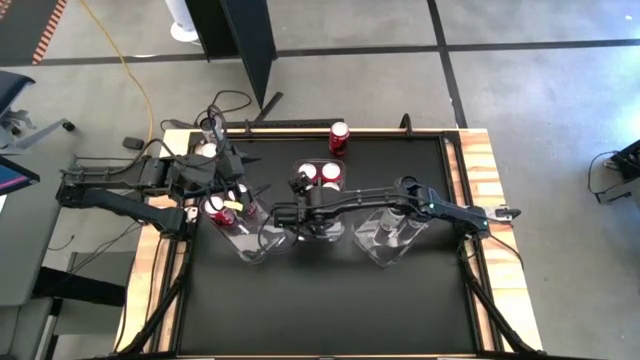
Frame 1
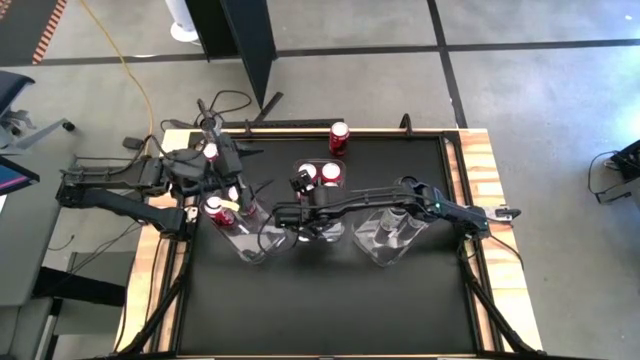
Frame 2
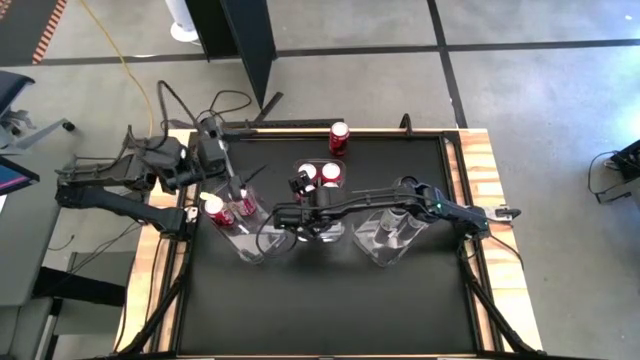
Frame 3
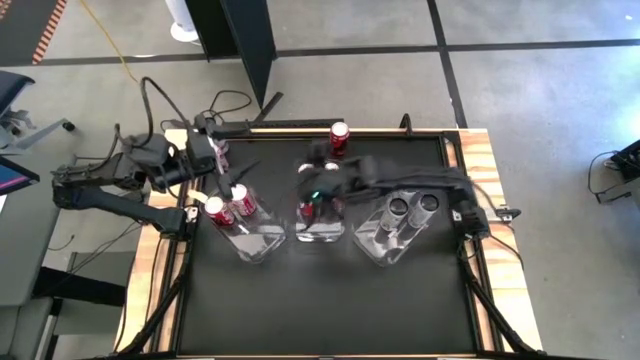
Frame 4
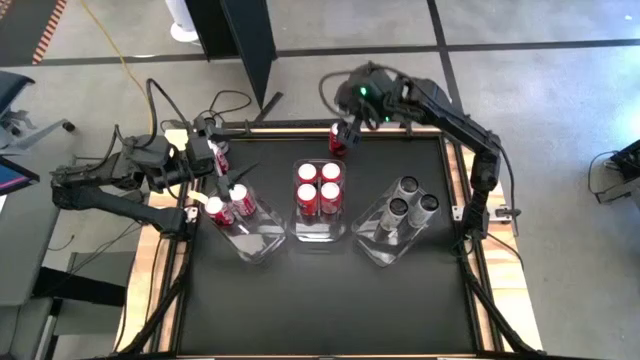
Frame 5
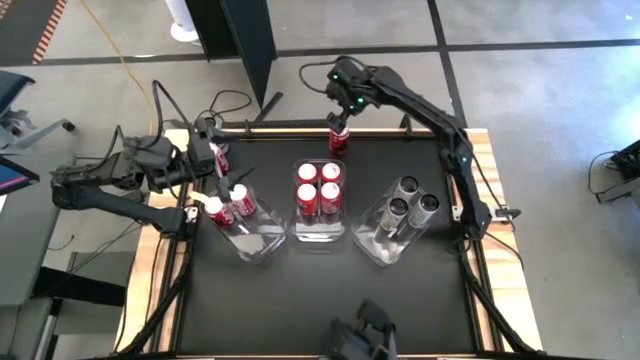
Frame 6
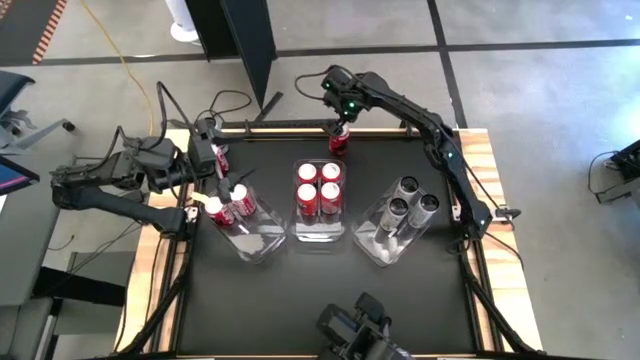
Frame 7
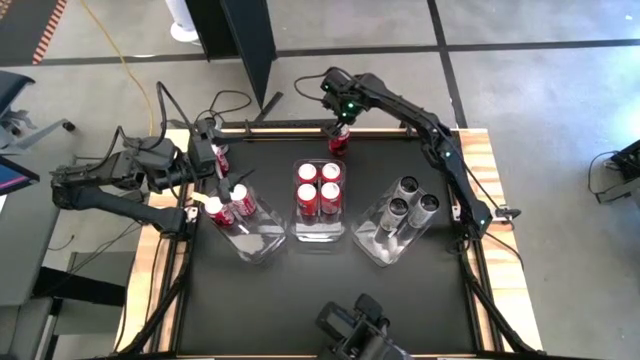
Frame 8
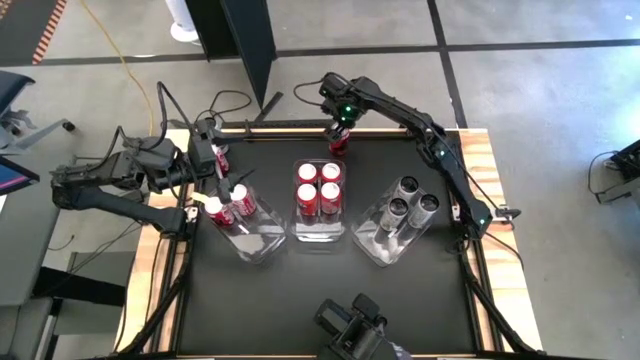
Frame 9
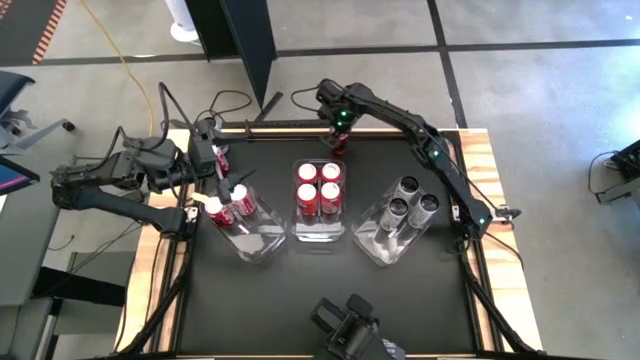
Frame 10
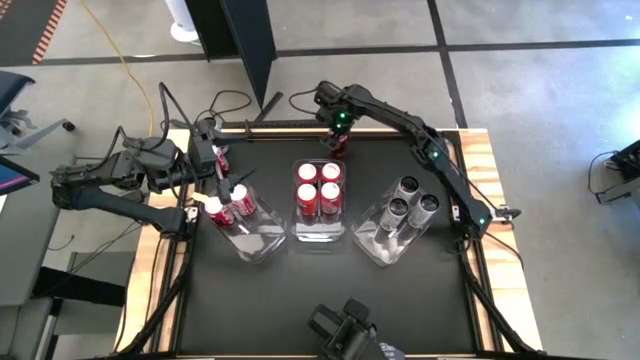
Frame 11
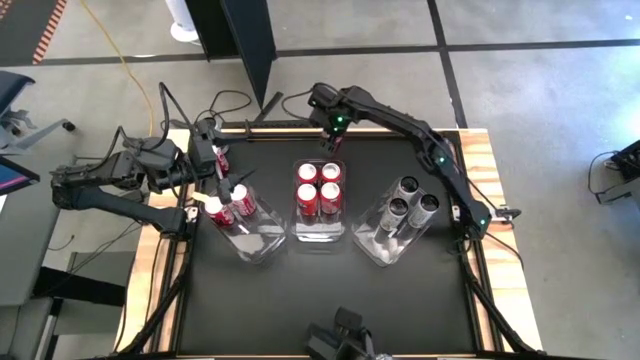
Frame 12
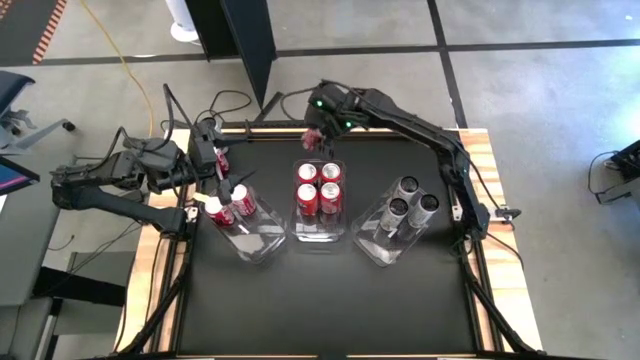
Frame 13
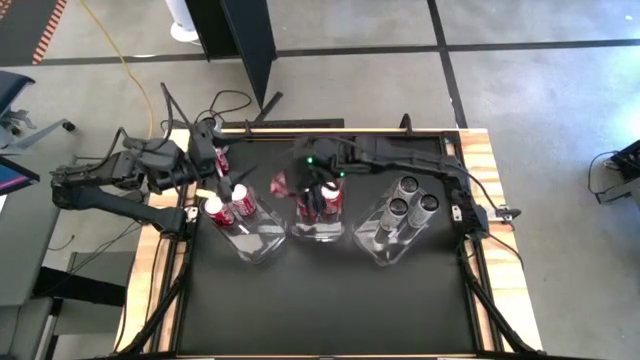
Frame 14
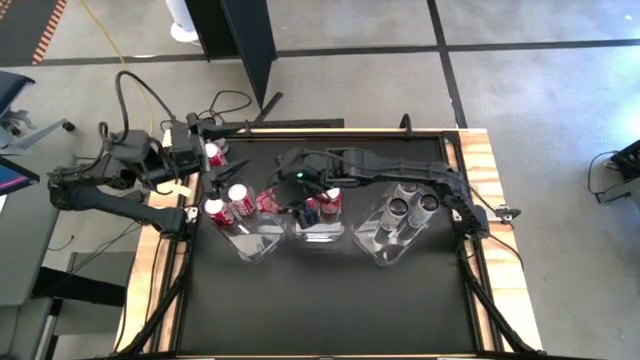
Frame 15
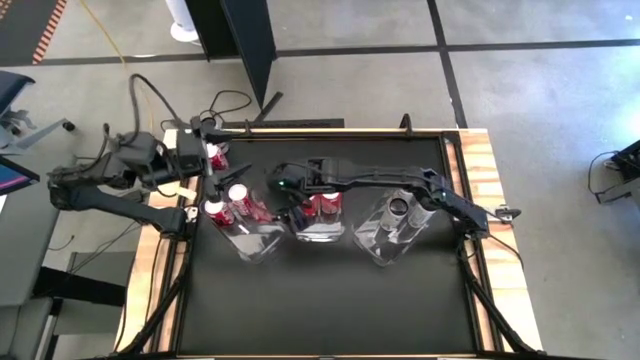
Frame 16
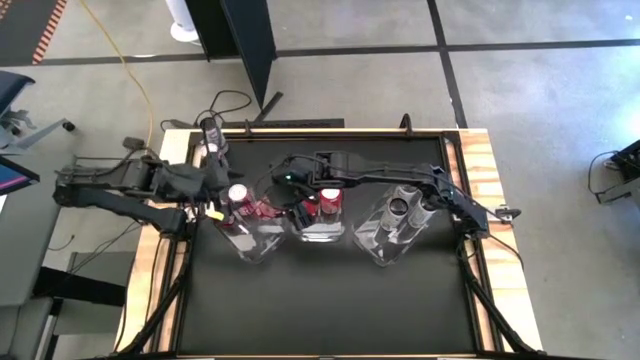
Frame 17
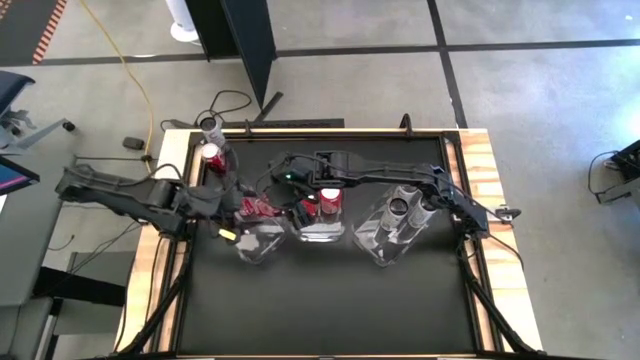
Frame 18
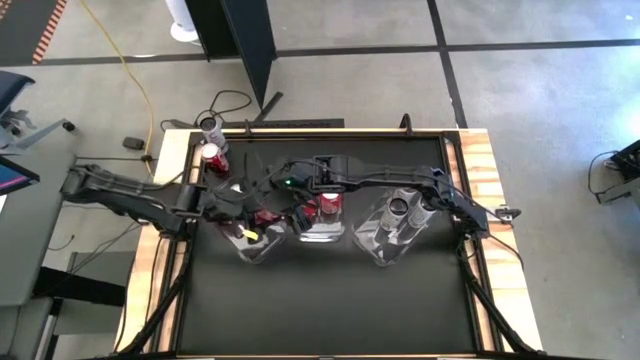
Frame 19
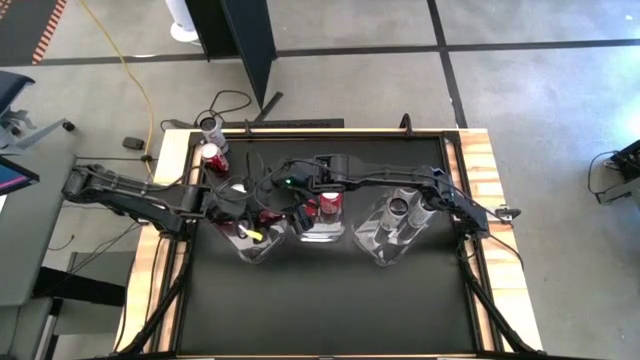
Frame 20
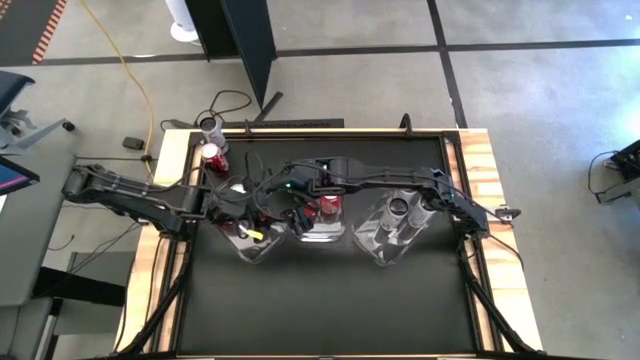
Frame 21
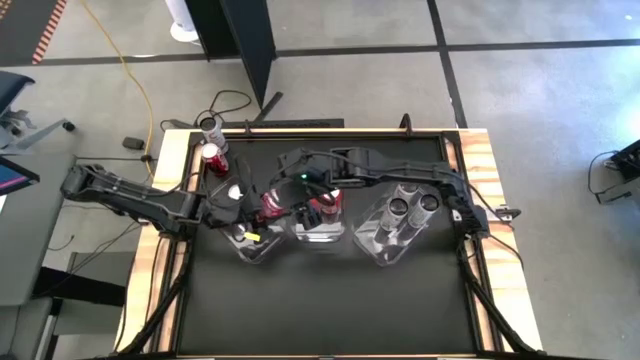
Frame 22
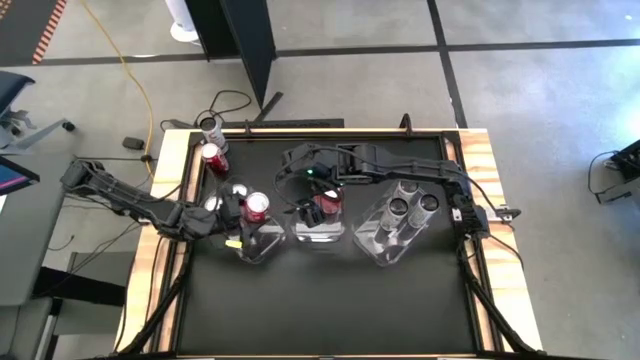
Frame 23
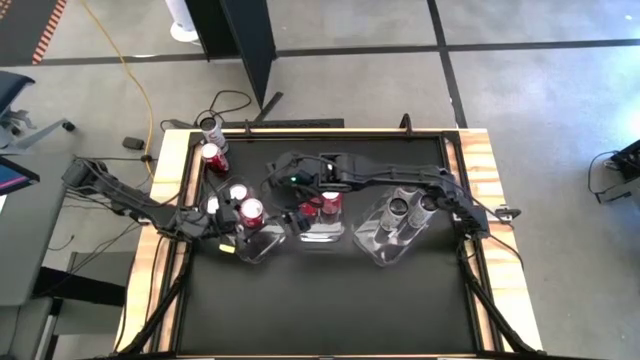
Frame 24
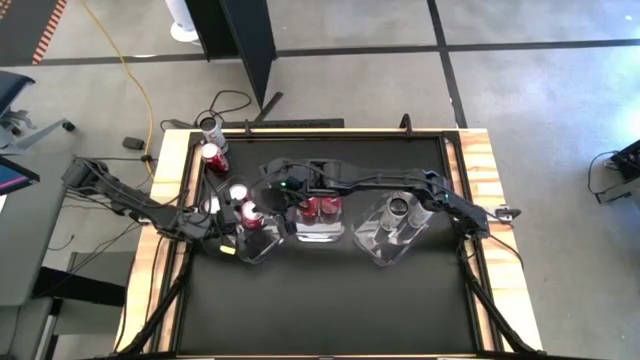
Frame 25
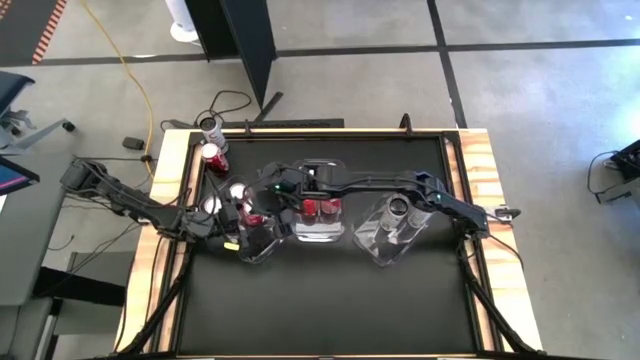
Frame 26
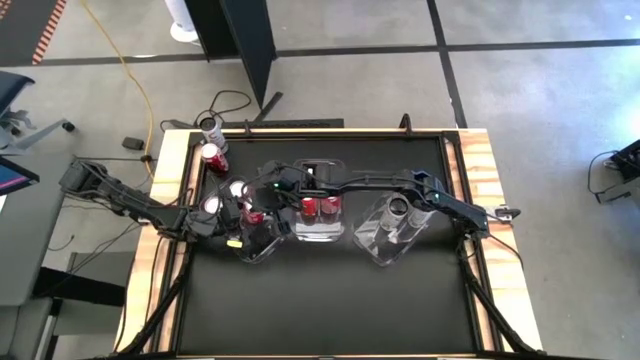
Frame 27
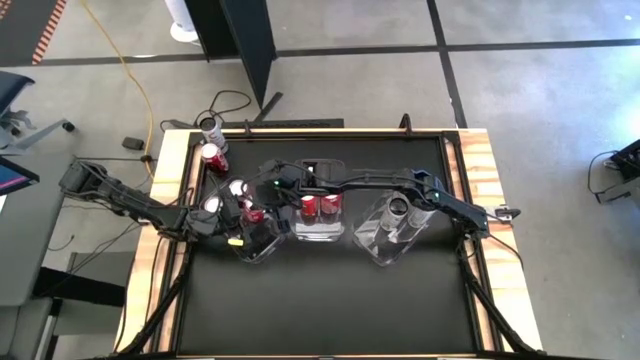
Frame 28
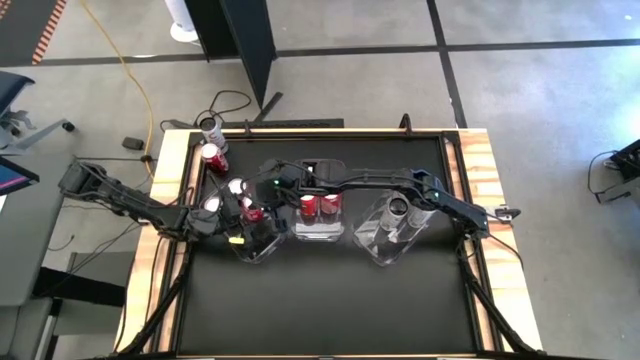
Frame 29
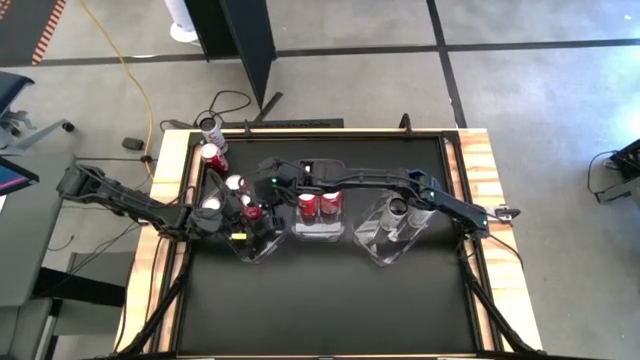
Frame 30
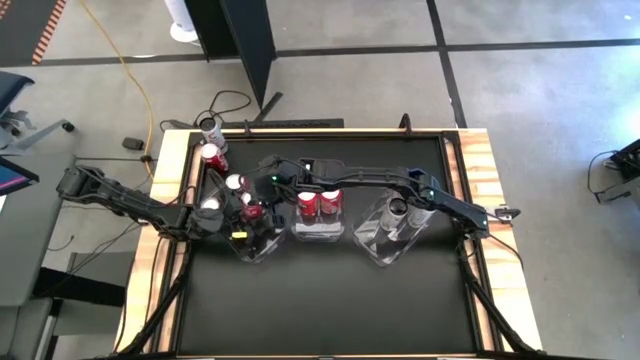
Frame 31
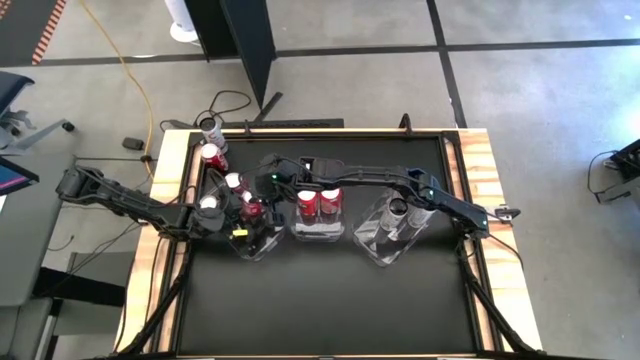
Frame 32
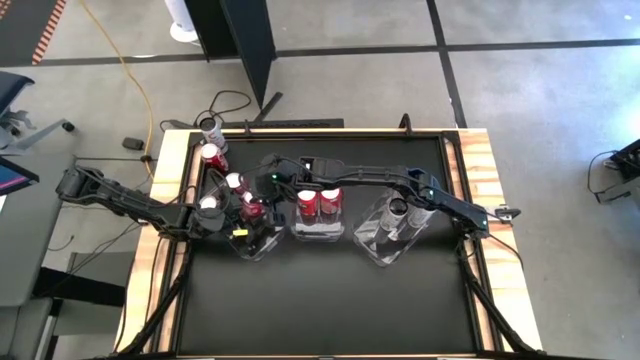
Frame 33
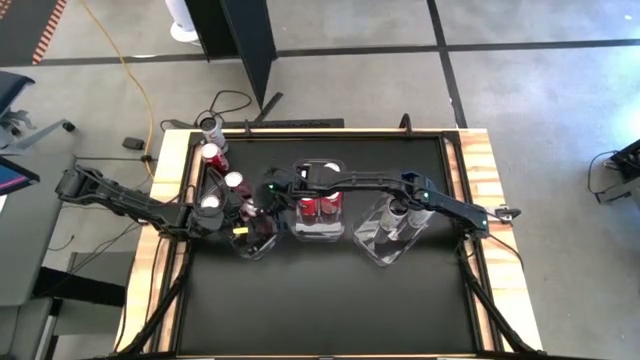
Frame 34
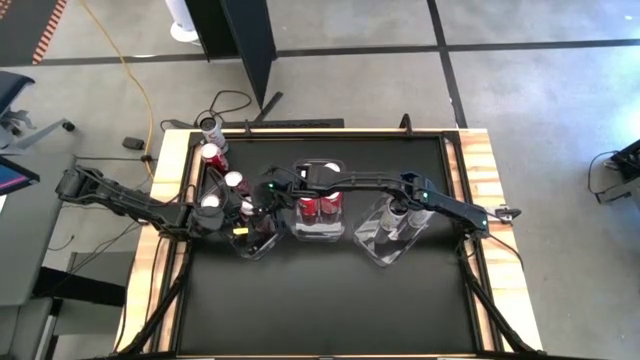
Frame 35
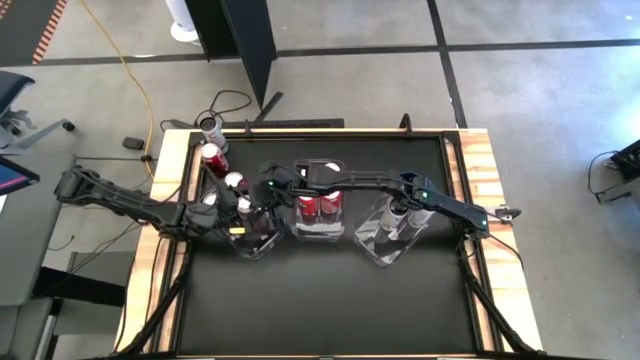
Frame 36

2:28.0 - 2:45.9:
Task: Sort soda cans
Put the top center red soda can into the left transparent bin

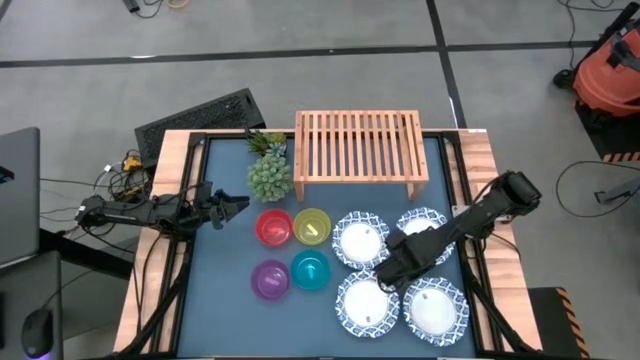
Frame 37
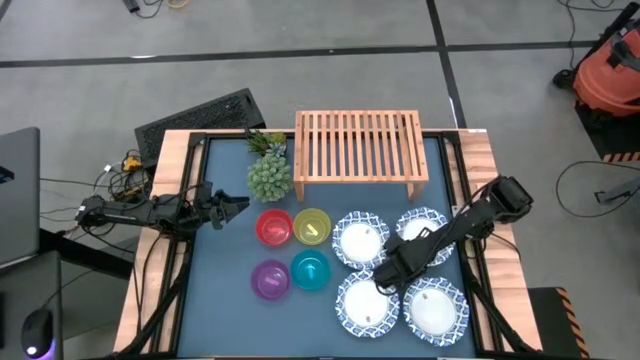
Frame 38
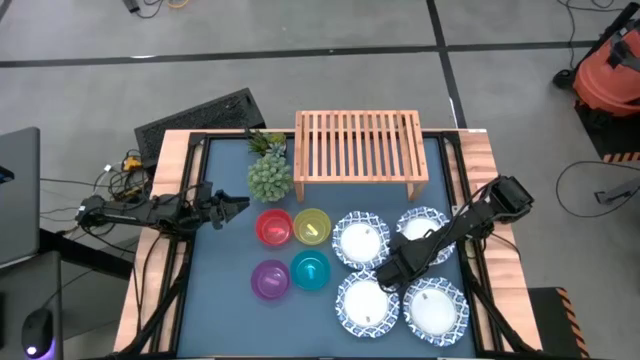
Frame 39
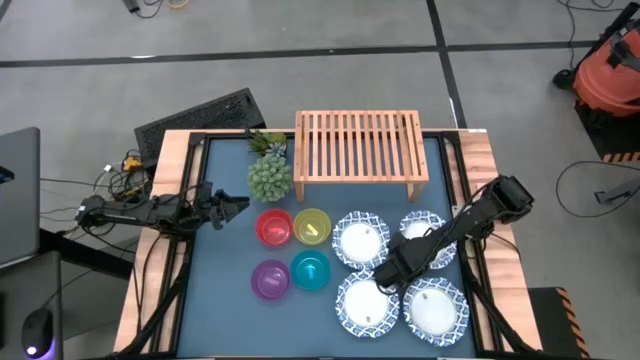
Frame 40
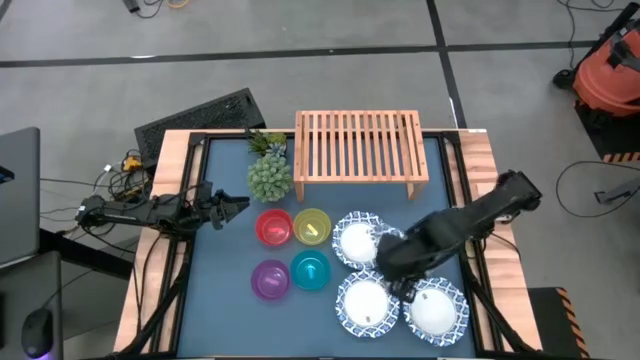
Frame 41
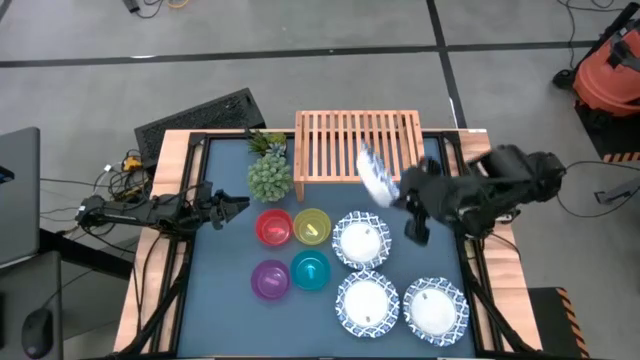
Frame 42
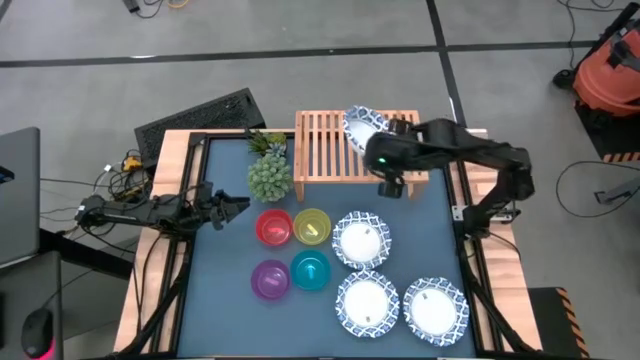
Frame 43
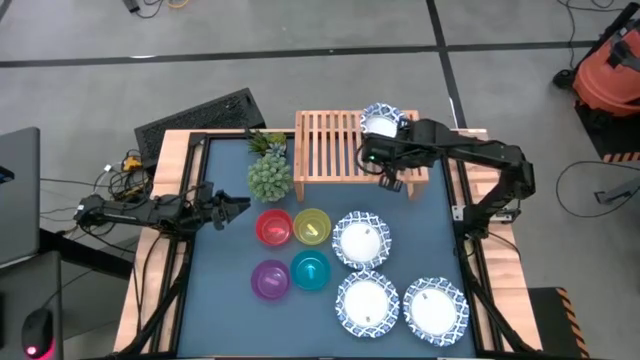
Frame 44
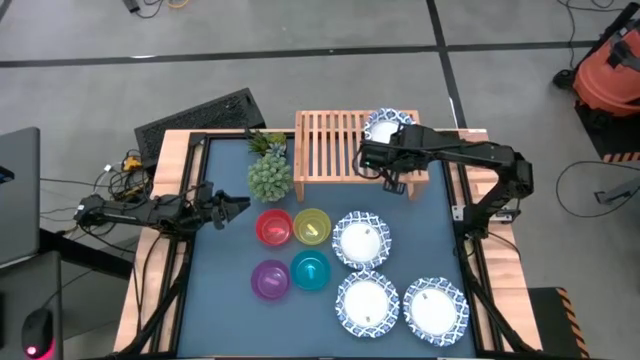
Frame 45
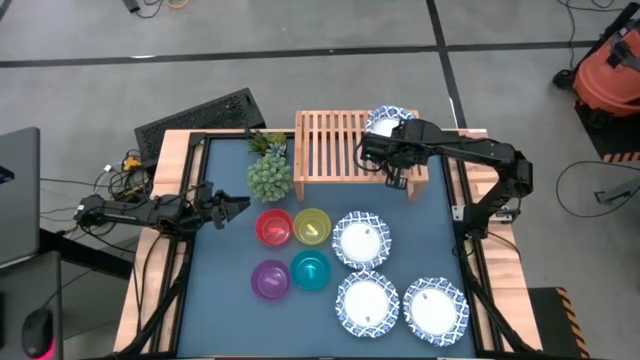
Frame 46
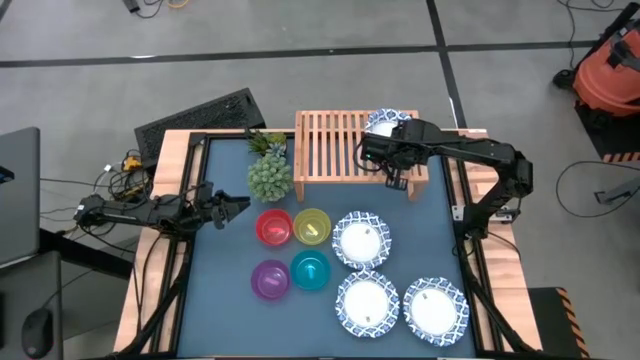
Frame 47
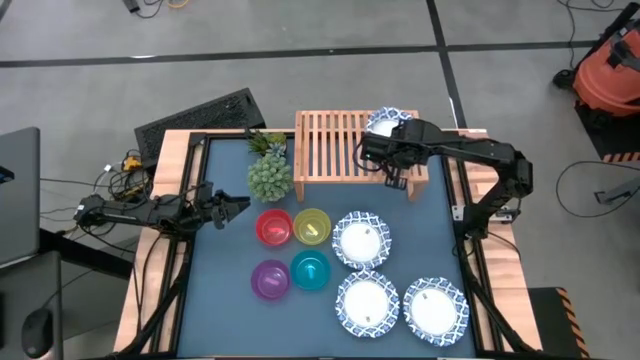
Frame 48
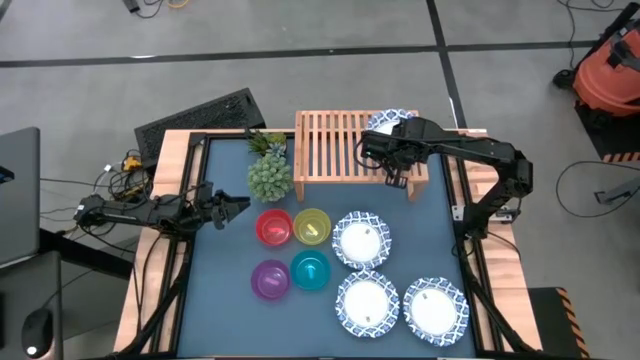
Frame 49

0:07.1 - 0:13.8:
Task: Place and stack bowls onto a shelf
Put the white patterned bowl on the shelf
